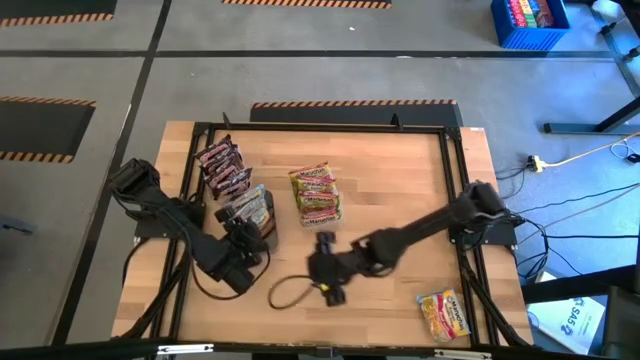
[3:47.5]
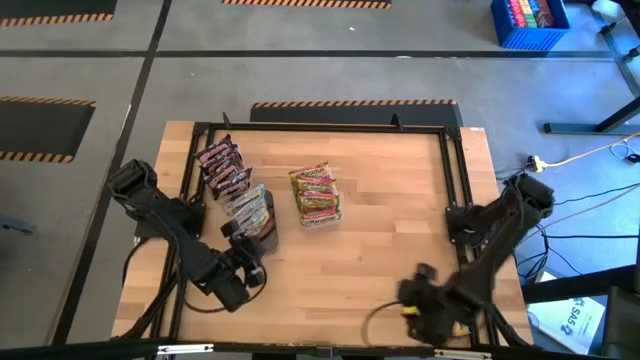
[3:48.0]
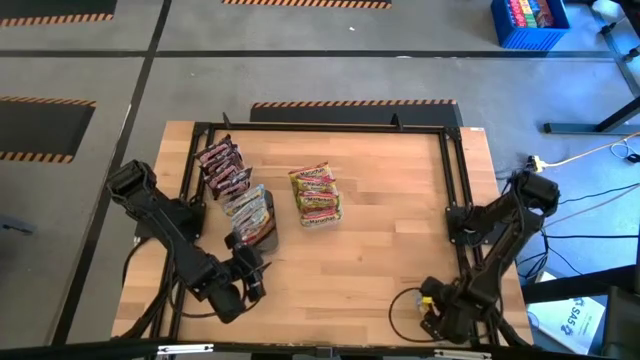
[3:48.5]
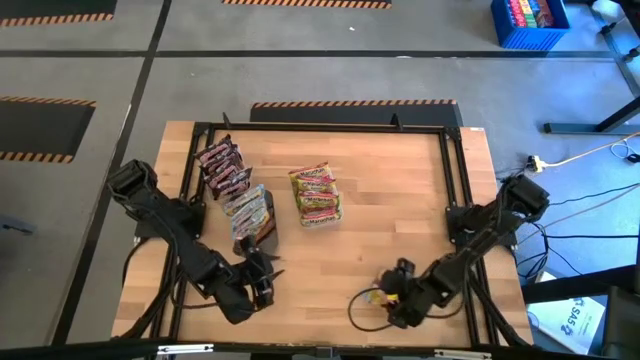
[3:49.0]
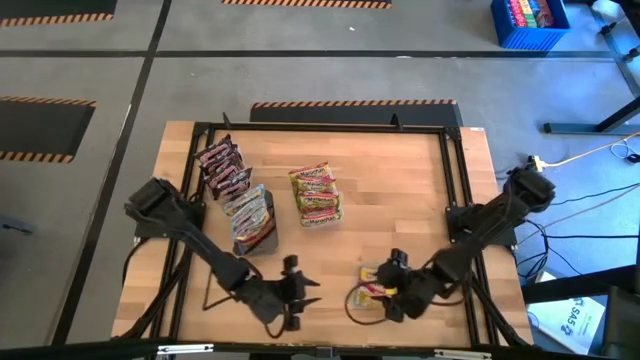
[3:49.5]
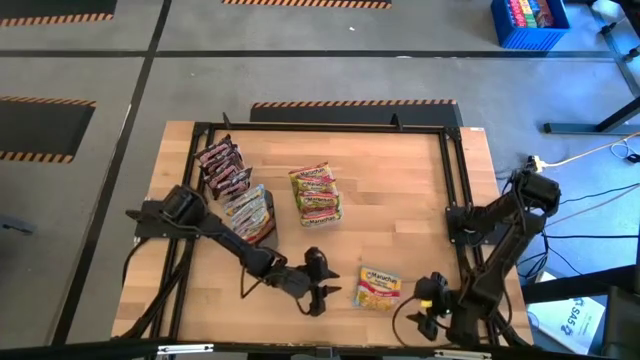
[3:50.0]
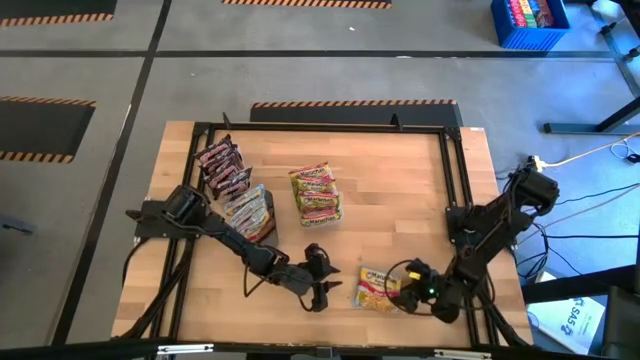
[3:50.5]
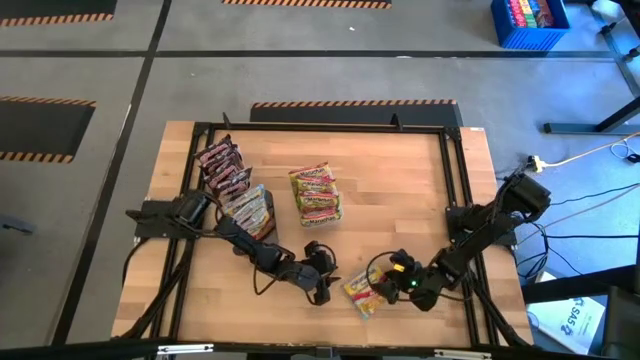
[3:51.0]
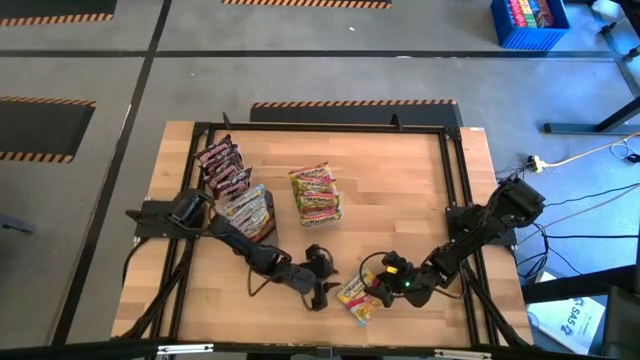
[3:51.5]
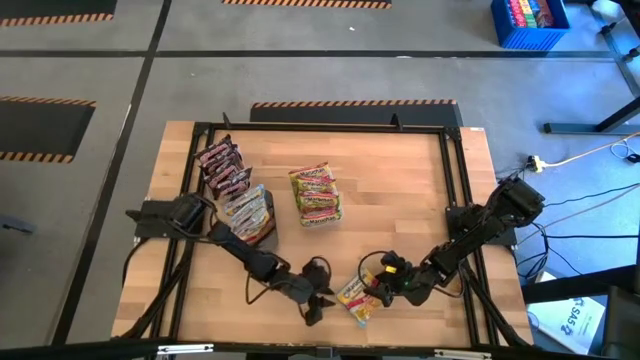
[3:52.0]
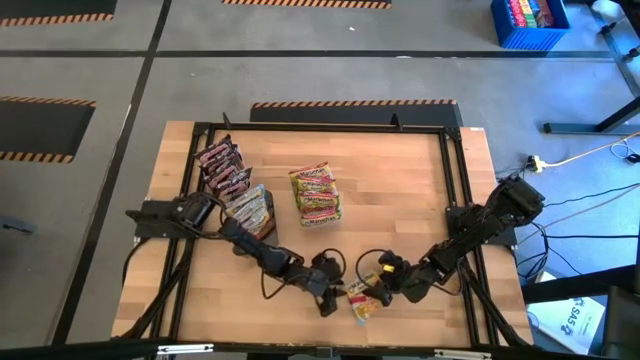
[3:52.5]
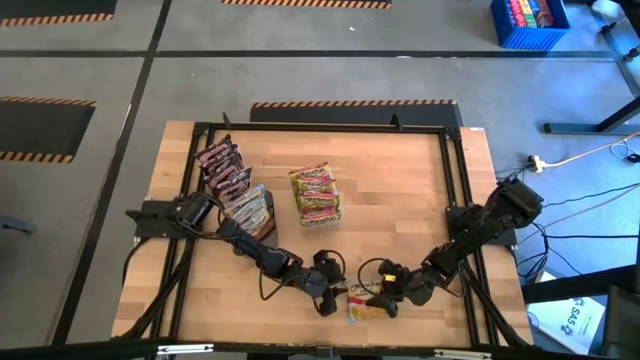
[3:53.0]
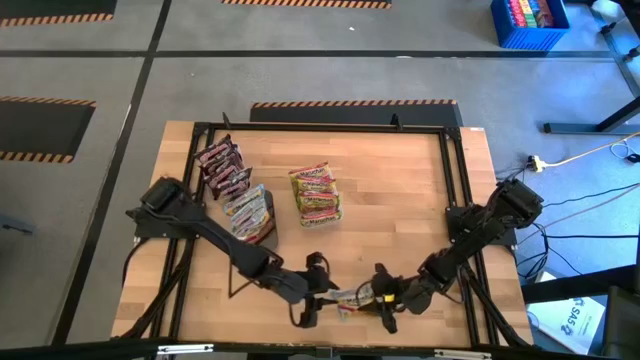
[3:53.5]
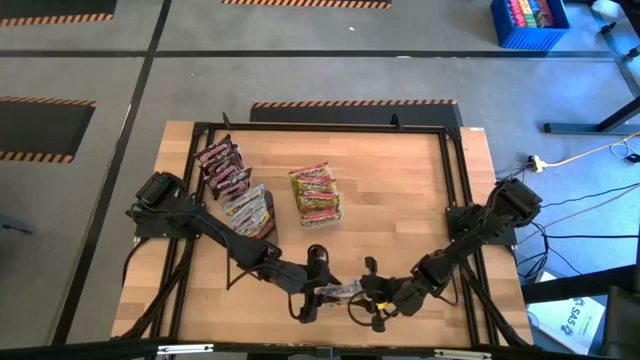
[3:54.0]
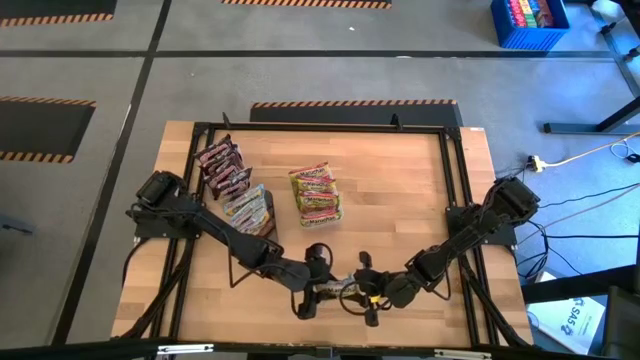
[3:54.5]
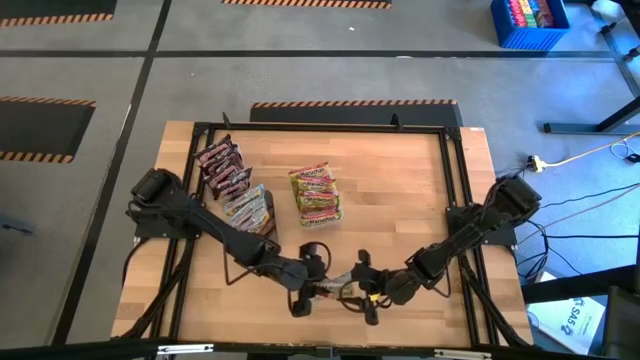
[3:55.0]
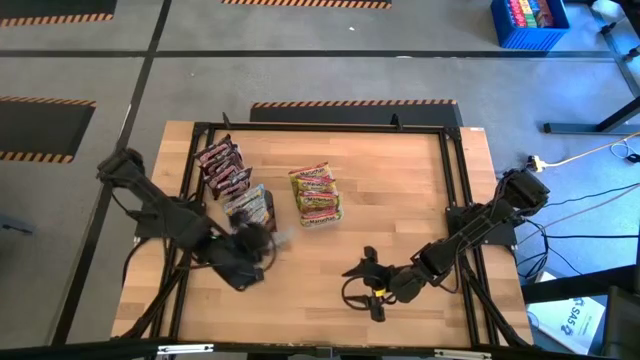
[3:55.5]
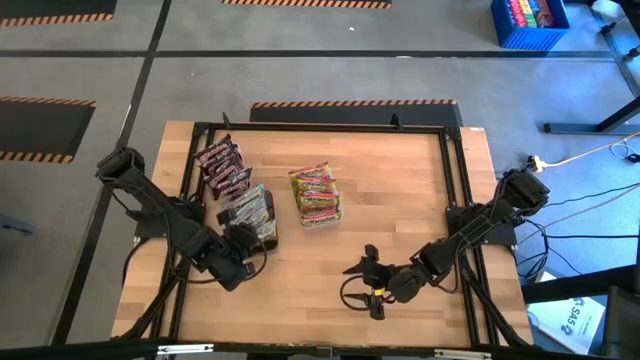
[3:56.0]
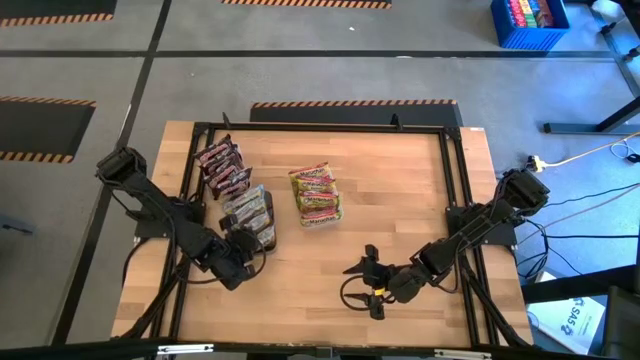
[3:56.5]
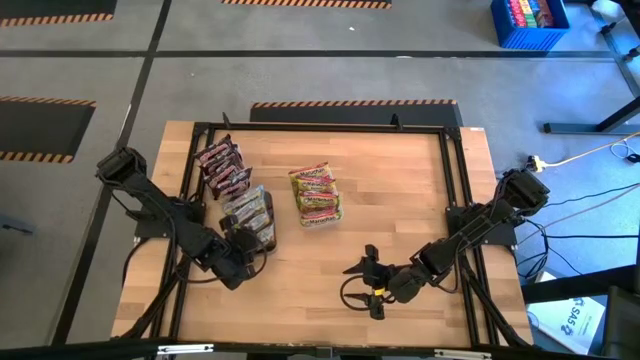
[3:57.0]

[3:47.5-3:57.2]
Task: Sort Maruchan noodles
Put the blue noodle pack into the black bin

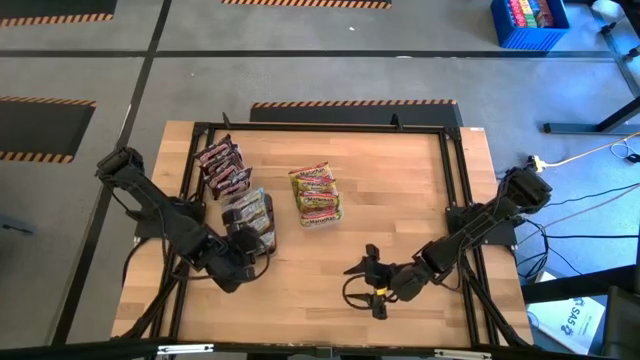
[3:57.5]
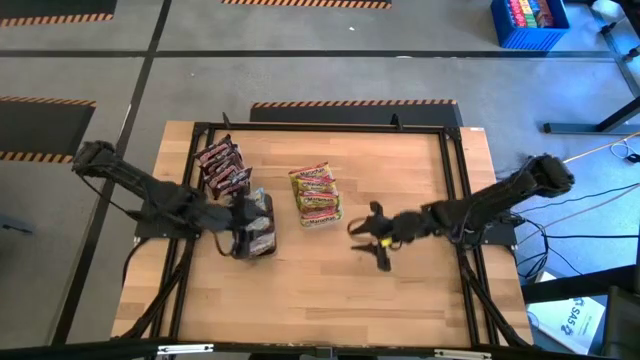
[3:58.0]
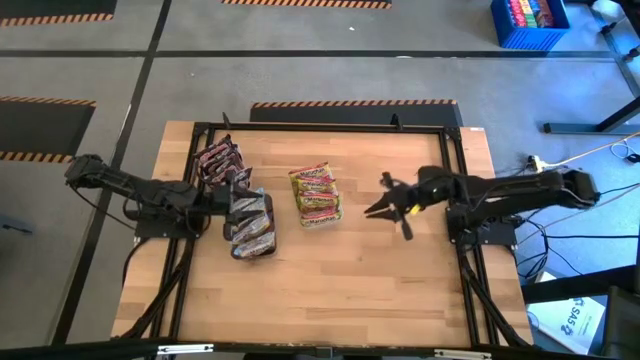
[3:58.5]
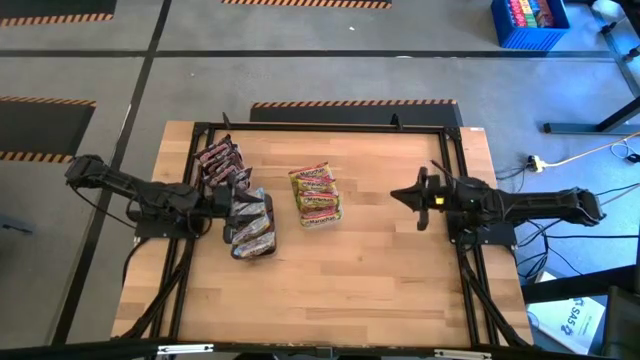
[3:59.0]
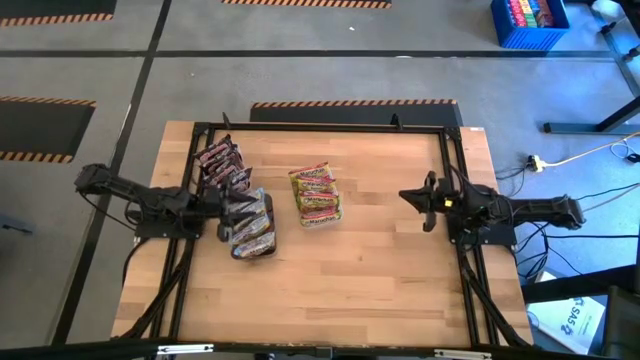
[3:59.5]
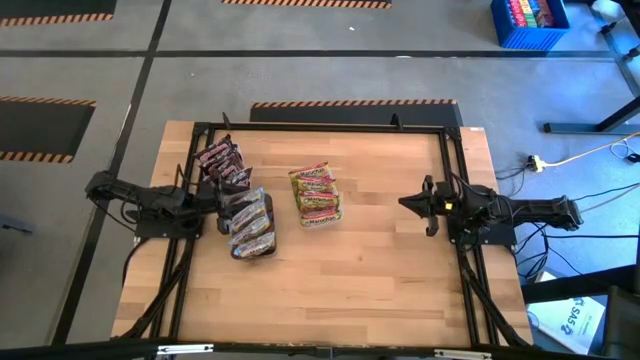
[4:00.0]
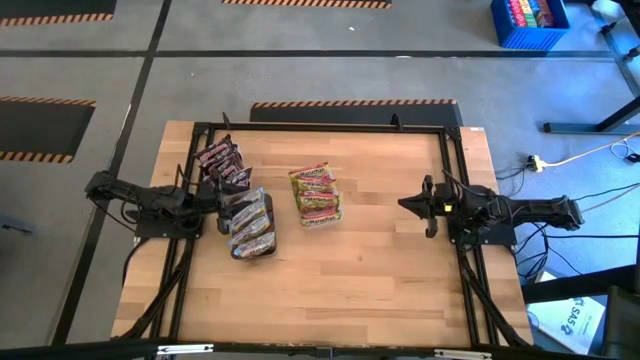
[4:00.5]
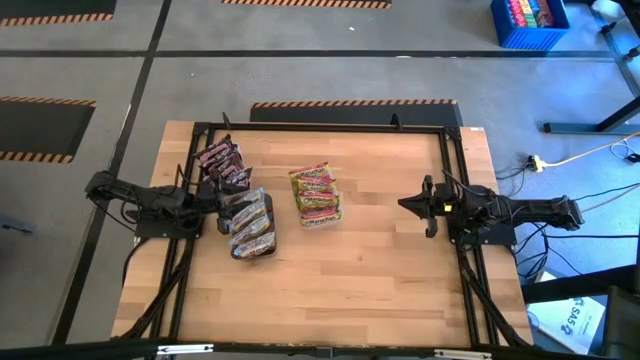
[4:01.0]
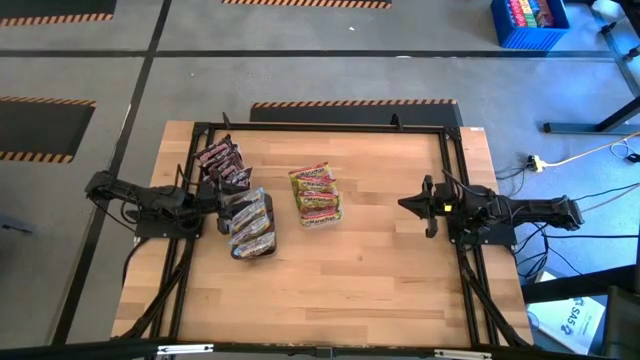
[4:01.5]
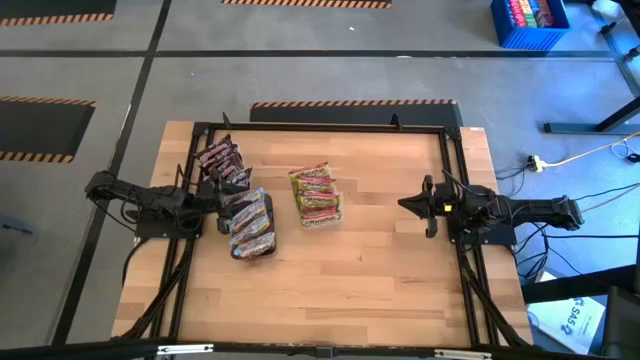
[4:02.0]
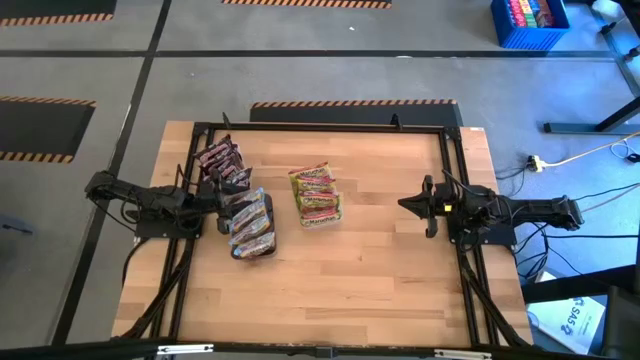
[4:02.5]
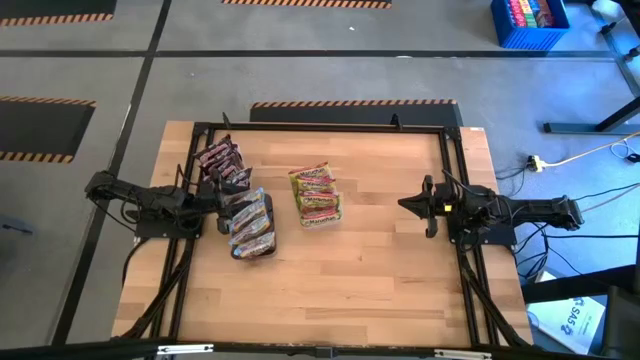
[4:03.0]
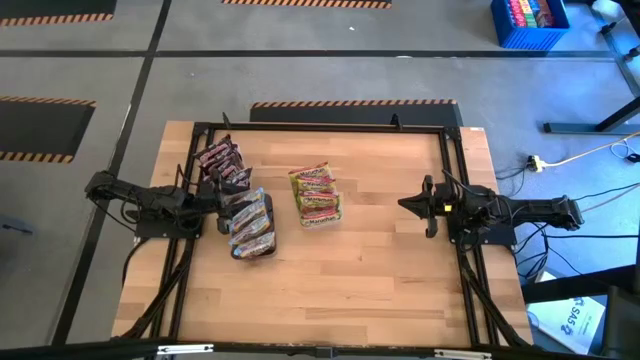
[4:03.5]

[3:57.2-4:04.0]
Return to Home Position

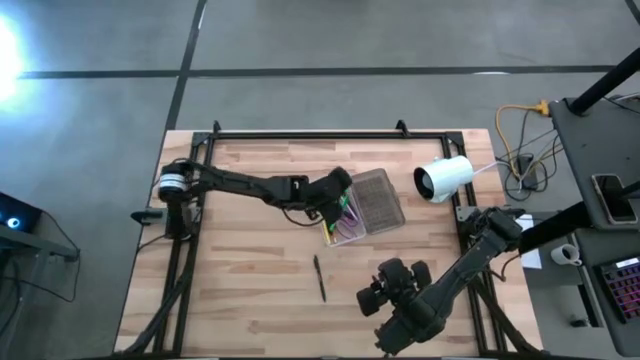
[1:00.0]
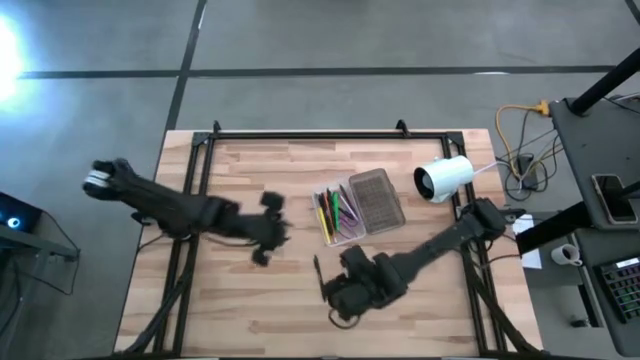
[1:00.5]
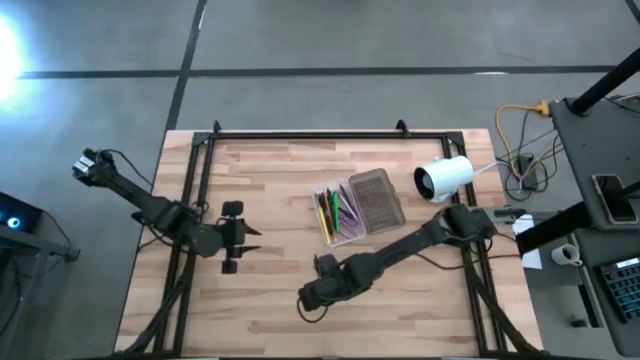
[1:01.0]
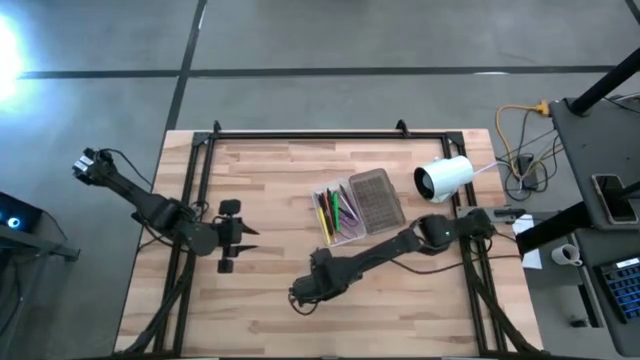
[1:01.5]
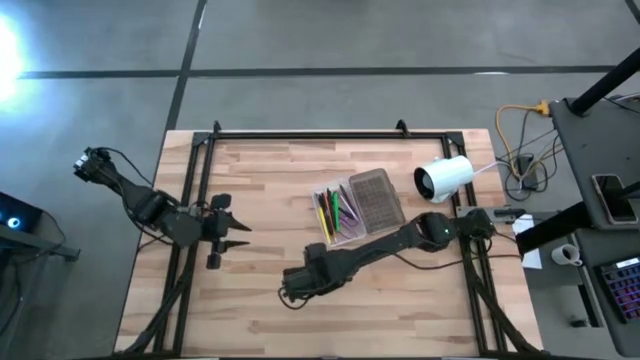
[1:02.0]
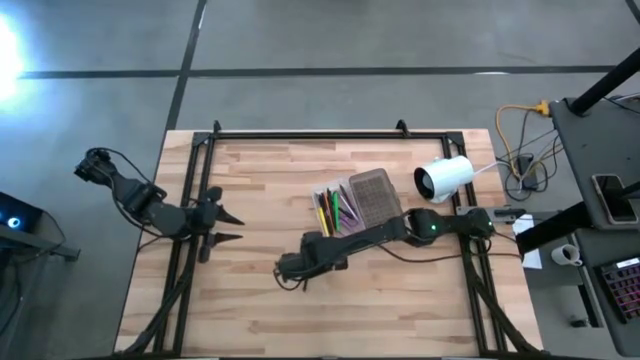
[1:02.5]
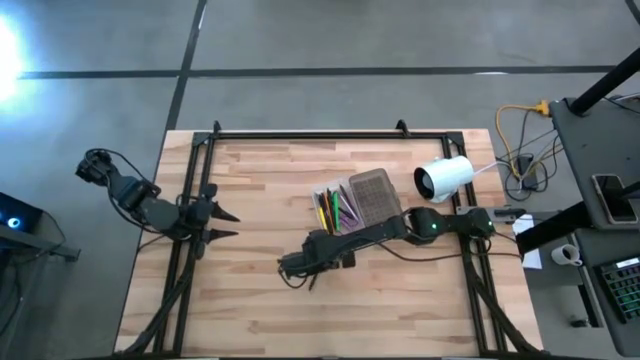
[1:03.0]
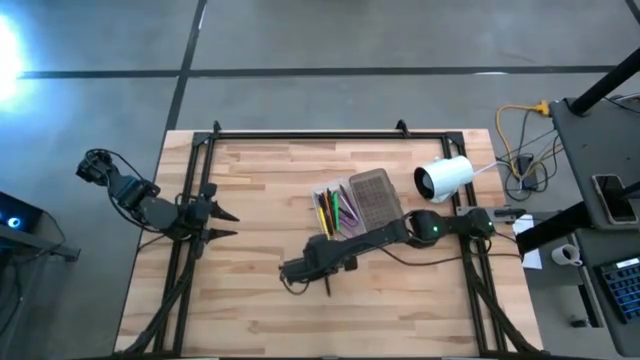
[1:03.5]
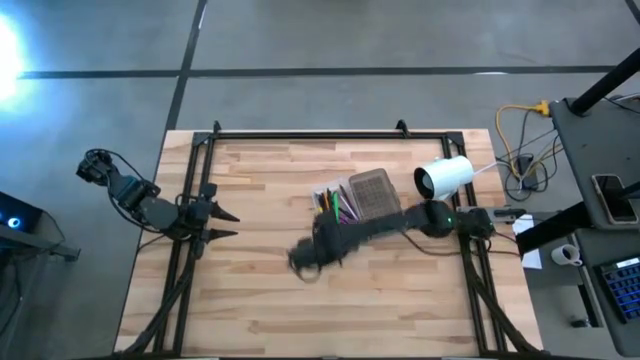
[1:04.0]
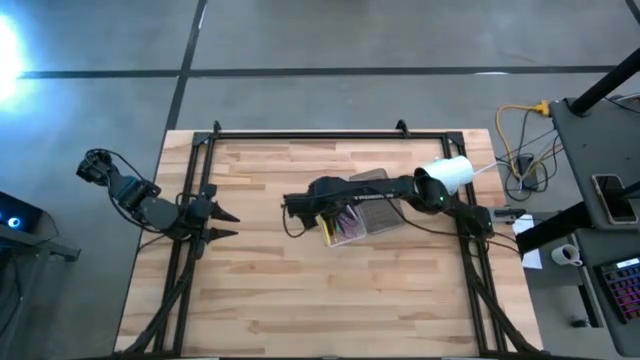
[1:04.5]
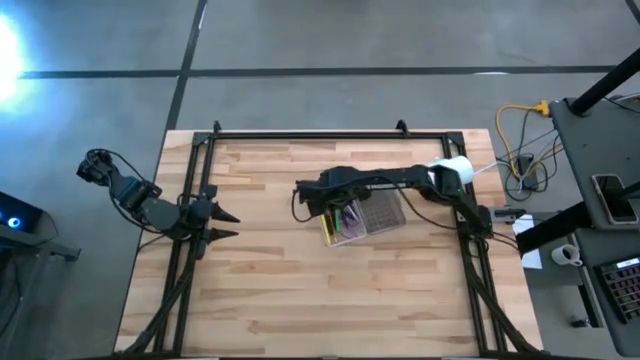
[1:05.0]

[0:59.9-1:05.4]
Task: Pick & place school supplies into a supply box
Put the black pen into the supply box
